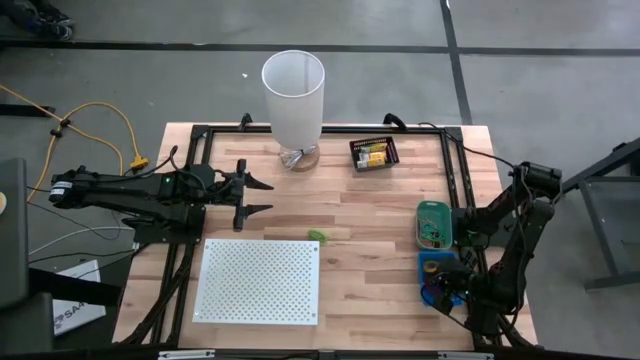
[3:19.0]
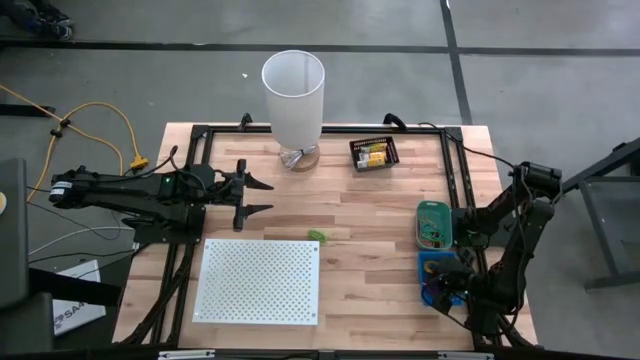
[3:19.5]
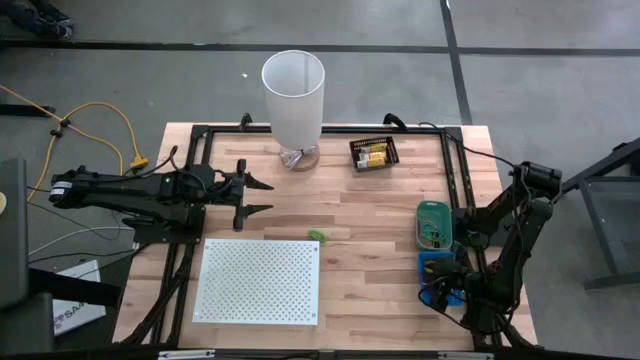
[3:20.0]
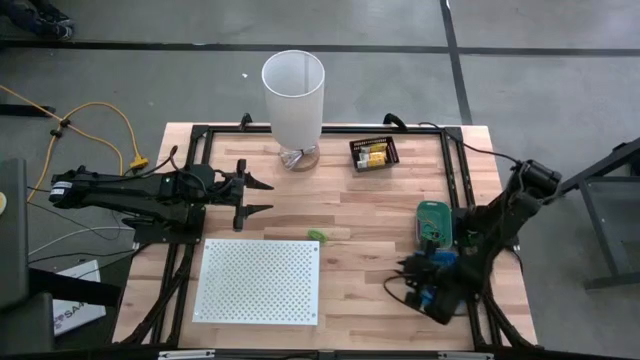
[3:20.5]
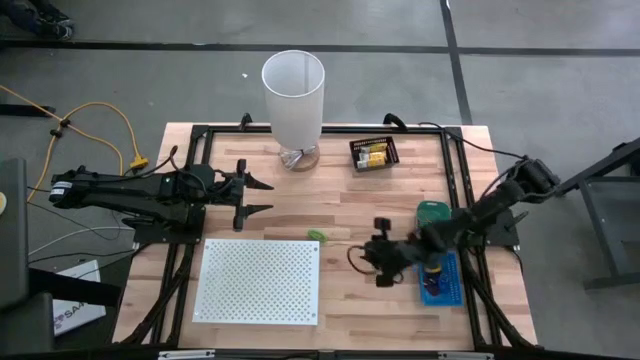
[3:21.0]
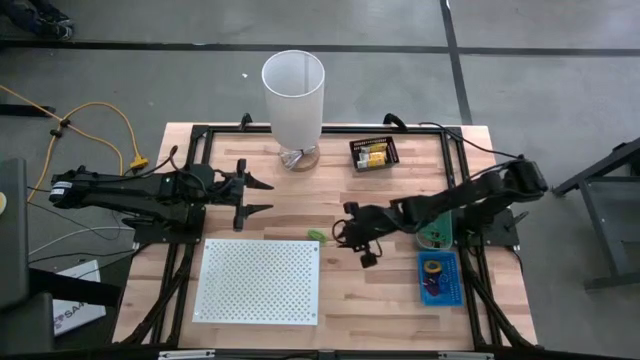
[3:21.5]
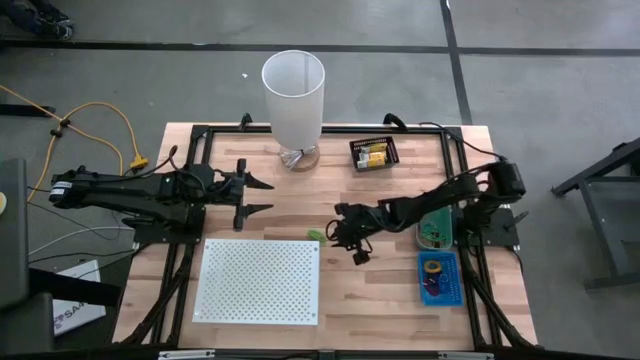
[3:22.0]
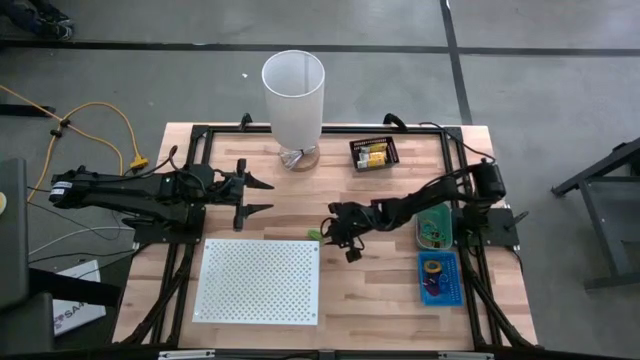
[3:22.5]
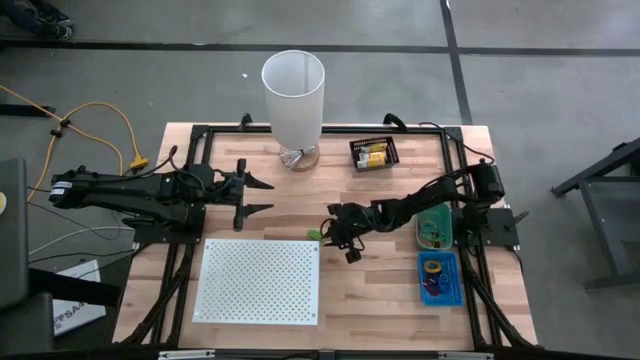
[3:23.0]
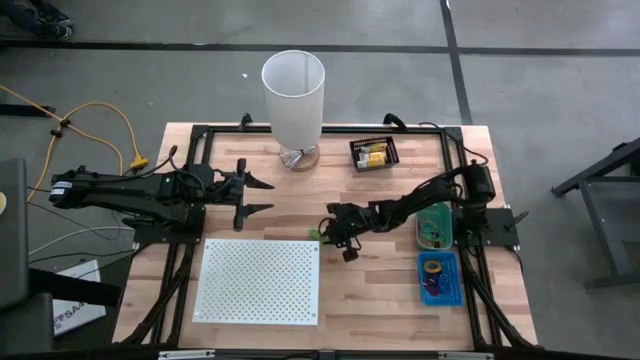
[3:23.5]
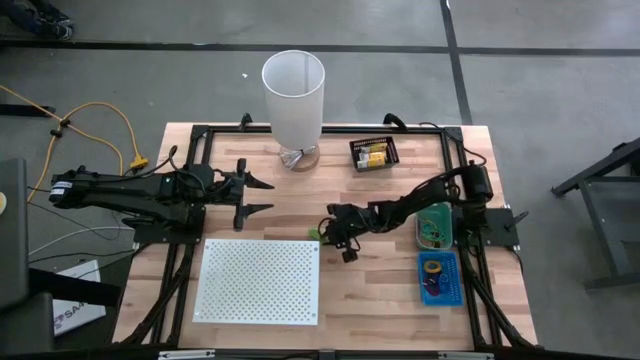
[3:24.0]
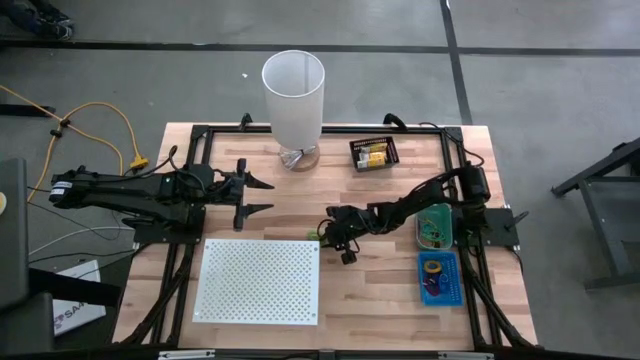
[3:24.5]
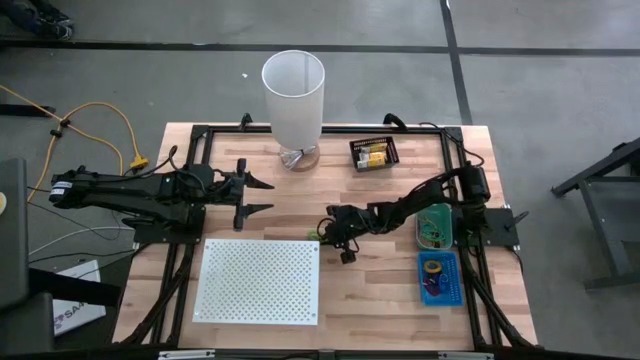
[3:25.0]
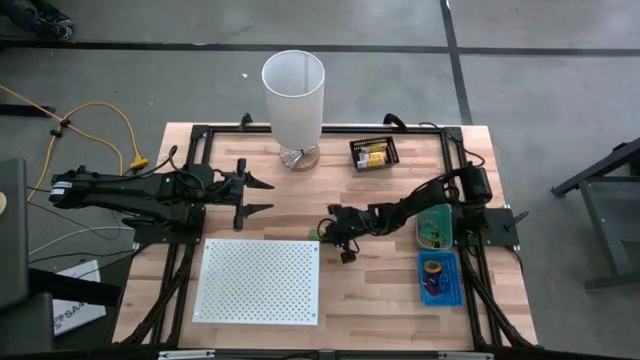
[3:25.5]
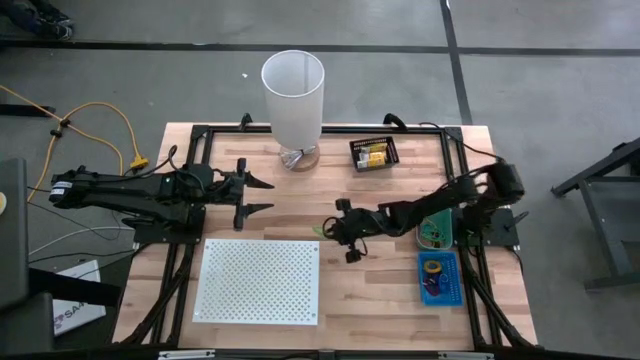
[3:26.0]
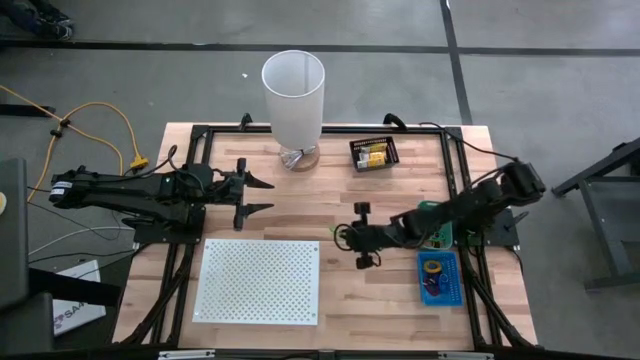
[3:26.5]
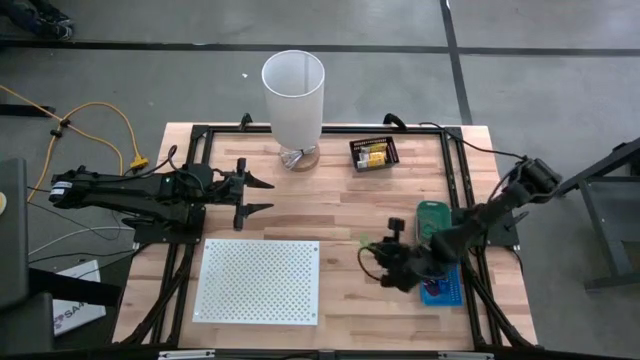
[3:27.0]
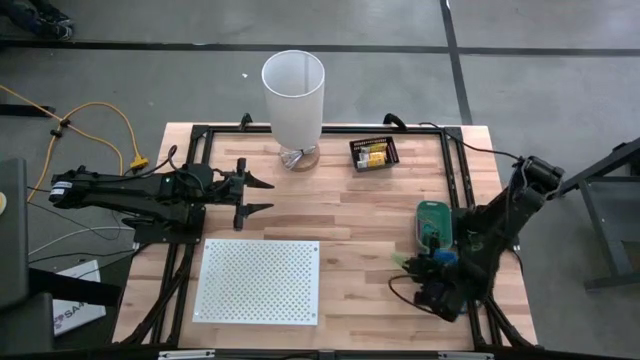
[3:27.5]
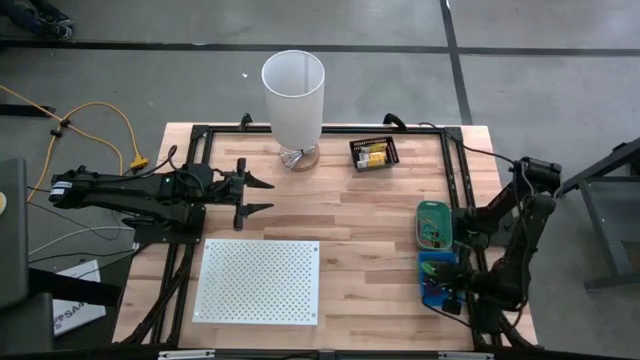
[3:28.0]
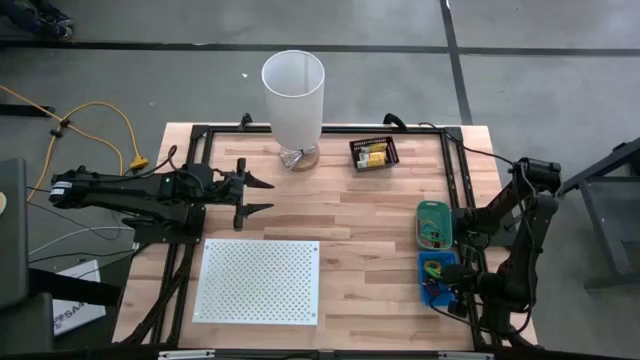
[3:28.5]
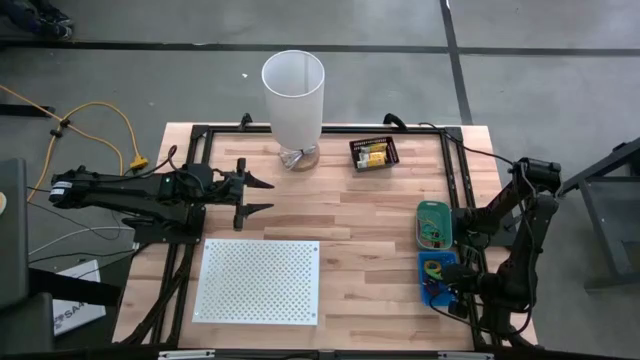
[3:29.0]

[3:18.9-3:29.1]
Task: Pick & Place Office Desk Supplies
Put the green spring keychain into the blue bin

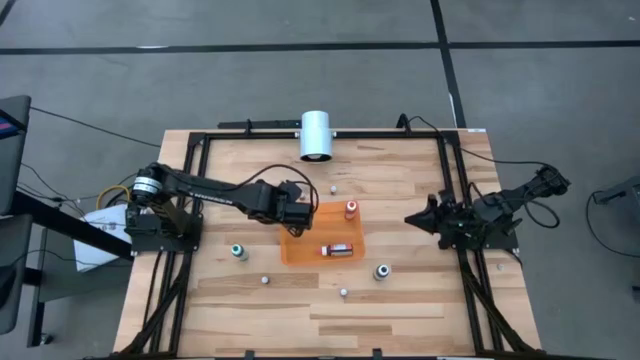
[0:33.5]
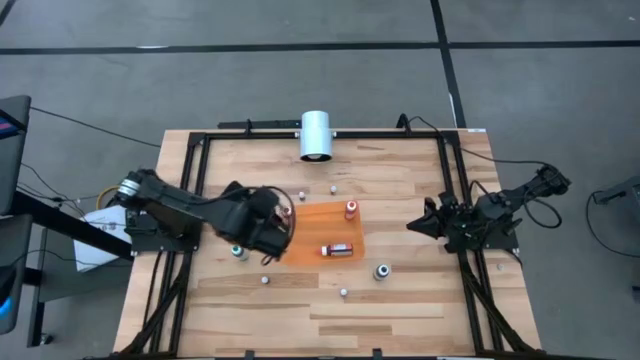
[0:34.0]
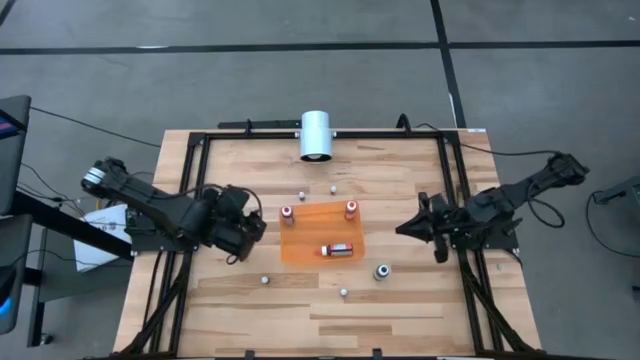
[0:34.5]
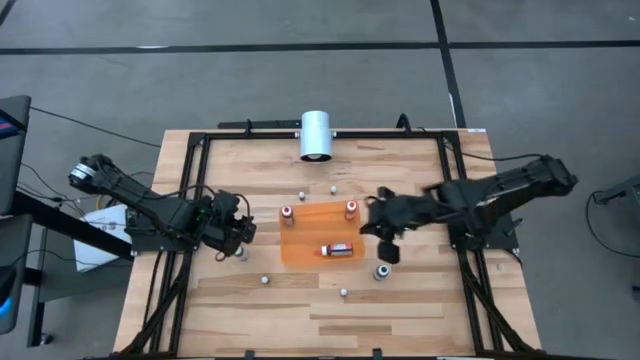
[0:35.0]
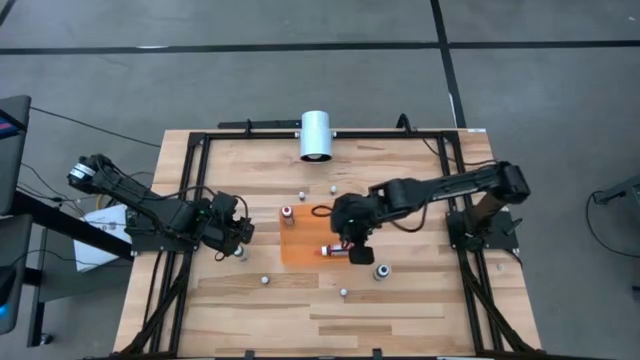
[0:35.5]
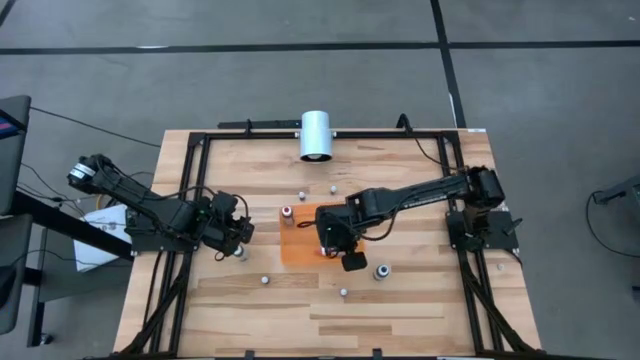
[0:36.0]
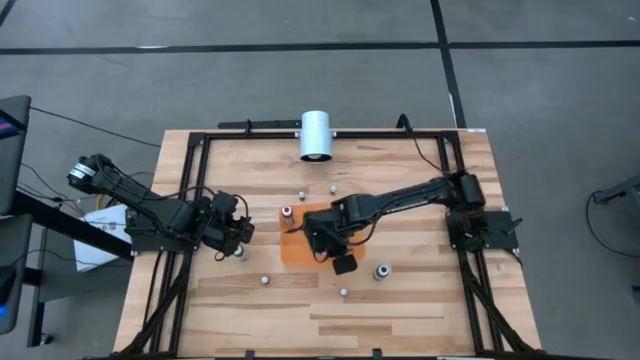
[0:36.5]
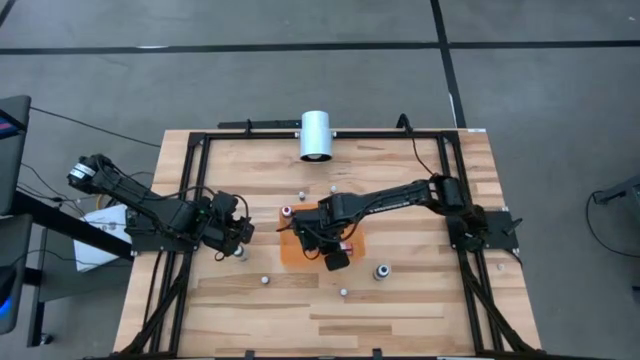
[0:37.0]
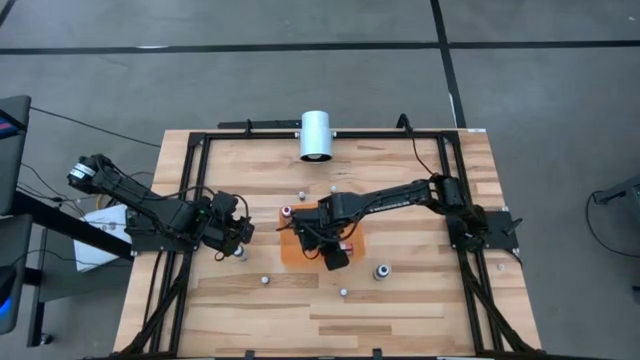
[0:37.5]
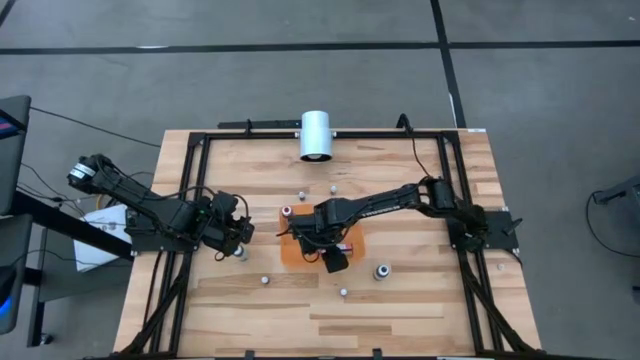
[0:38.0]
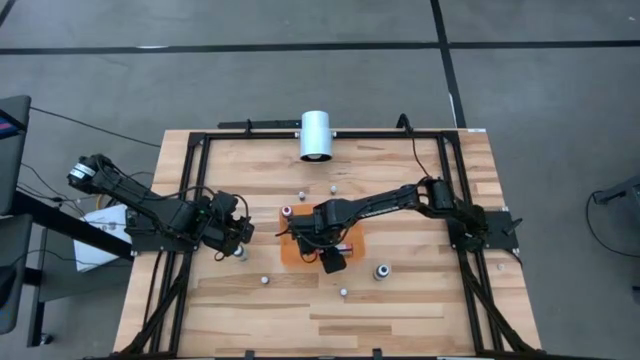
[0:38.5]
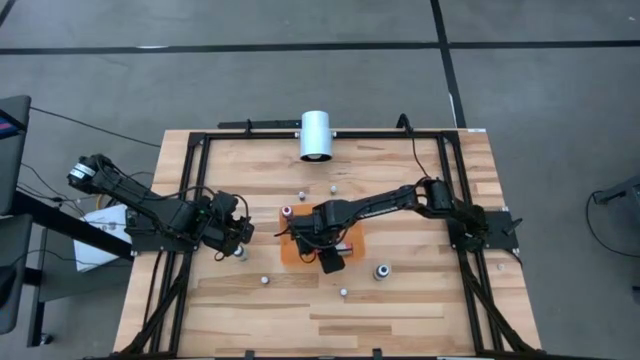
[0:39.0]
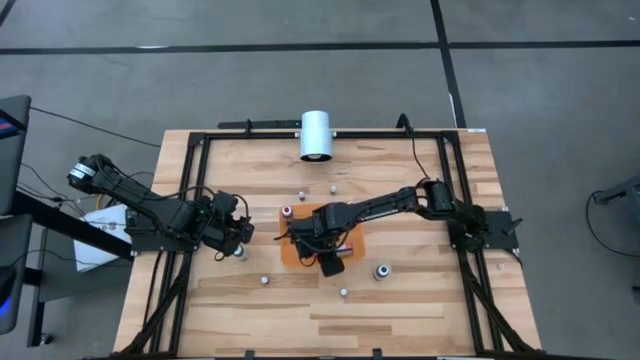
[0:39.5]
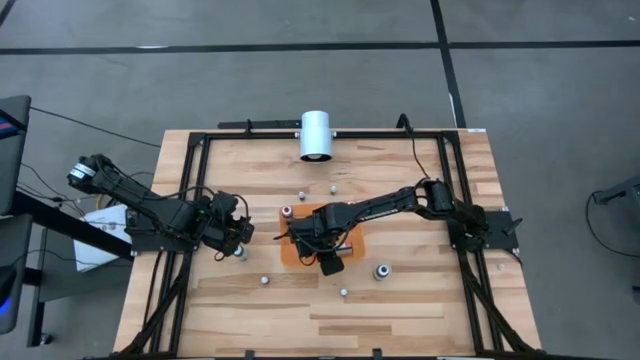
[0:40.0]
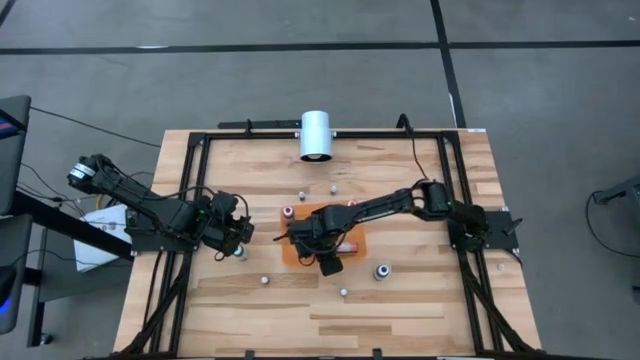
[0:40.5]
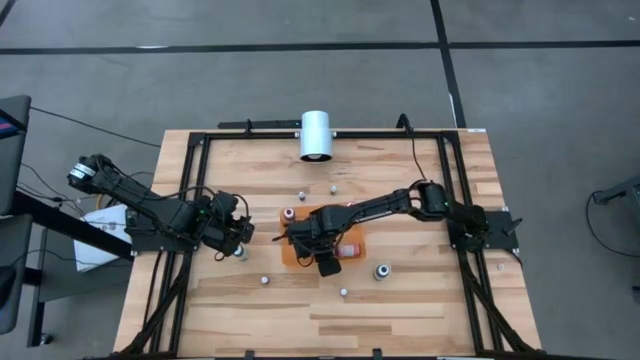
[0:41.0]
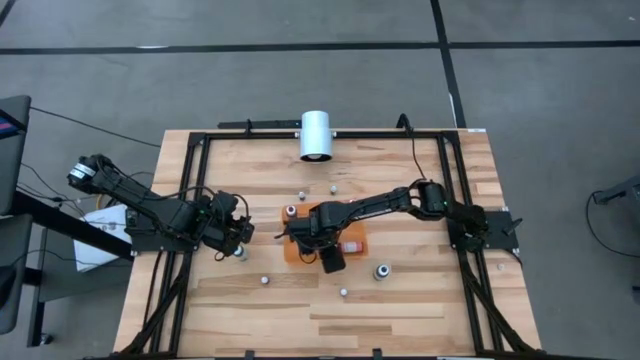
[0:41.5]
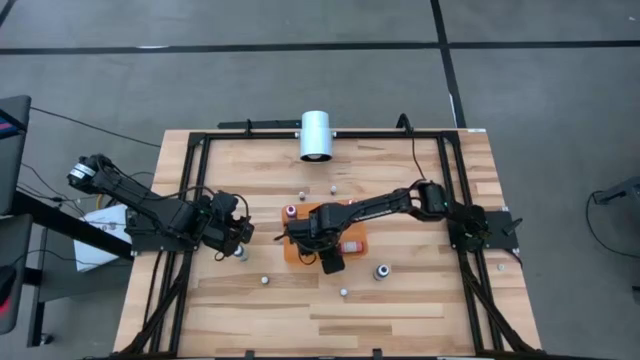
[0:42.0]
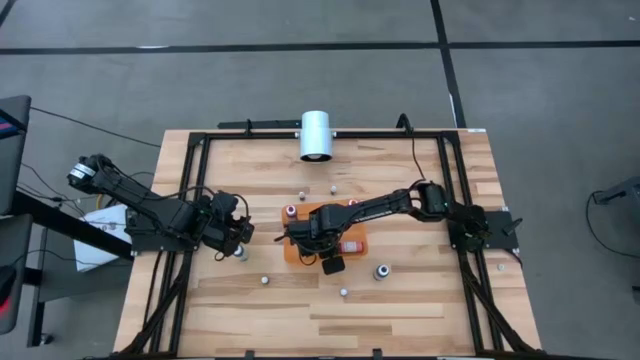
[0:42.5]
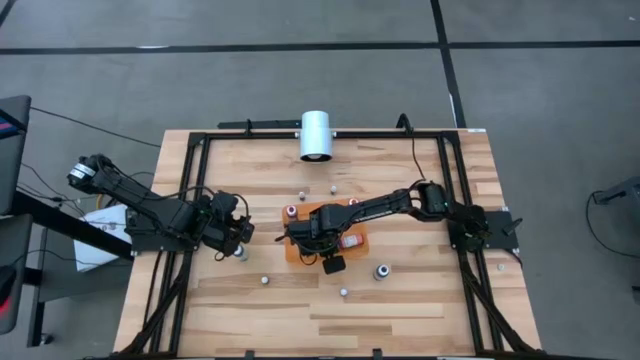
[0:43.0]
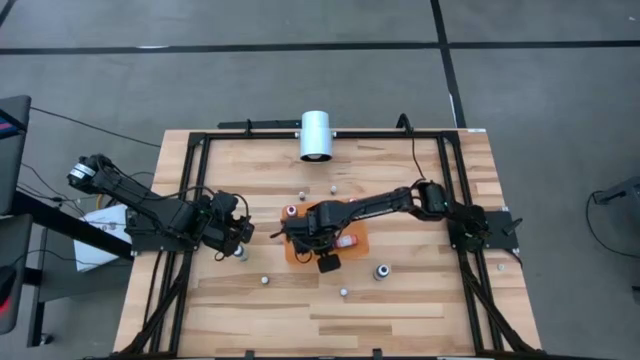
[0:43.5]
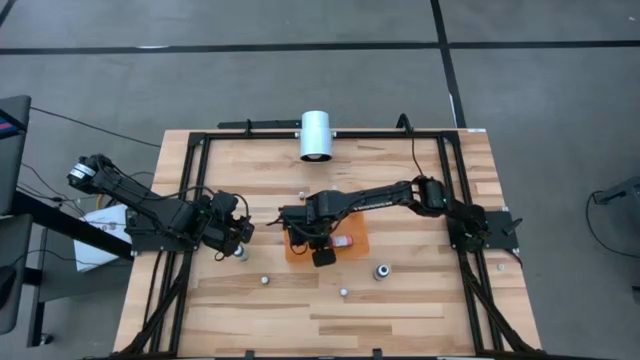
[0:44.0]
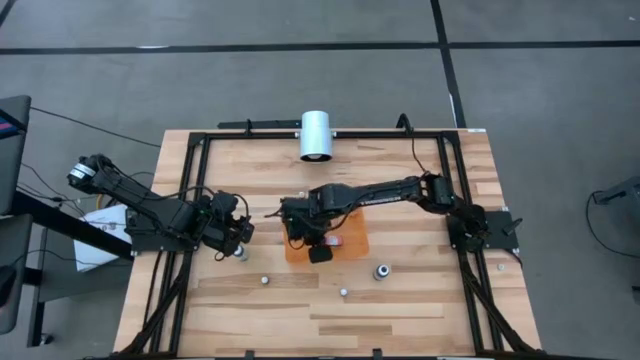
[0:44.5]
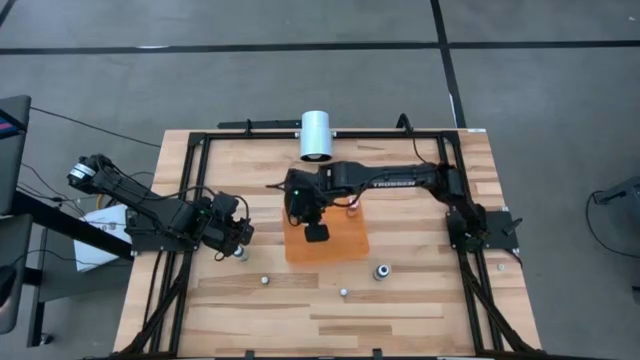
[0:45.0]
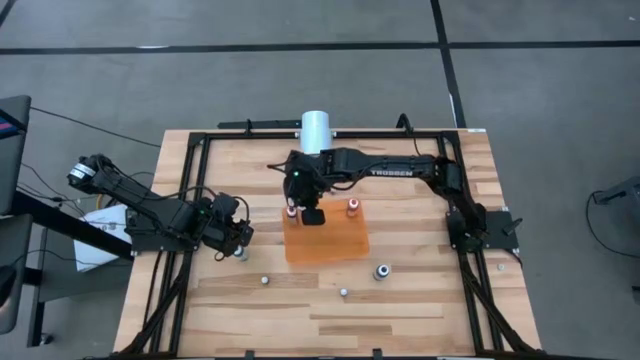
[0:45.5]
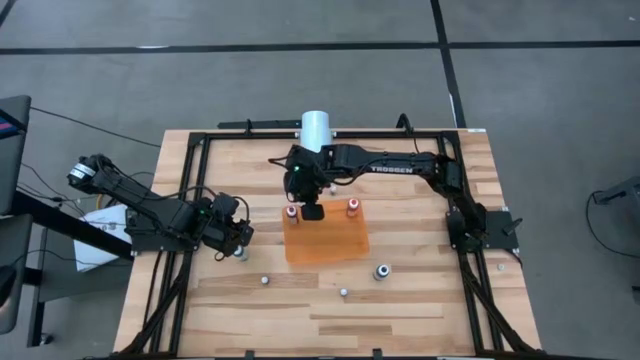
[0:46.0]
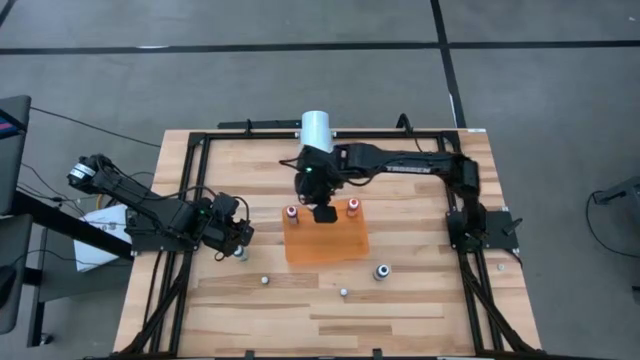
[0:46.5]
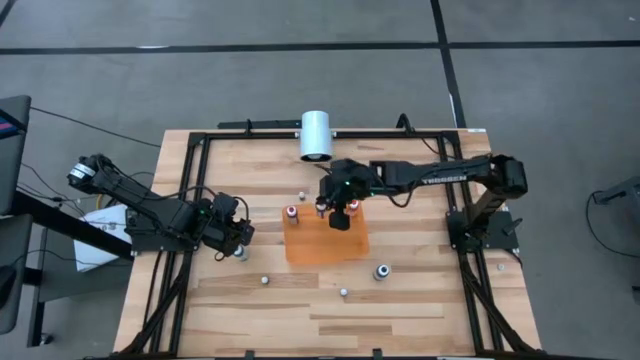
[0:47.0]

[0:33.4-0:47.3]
Task: Pick & Place food coloring
Adjust the large pink food coloring bottle in the orange container
